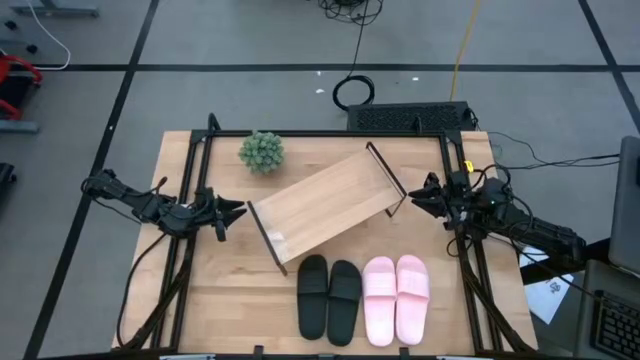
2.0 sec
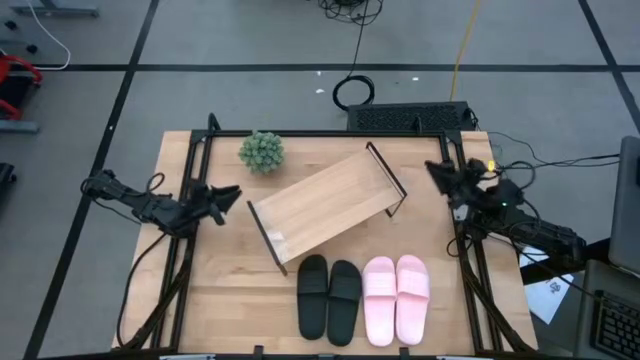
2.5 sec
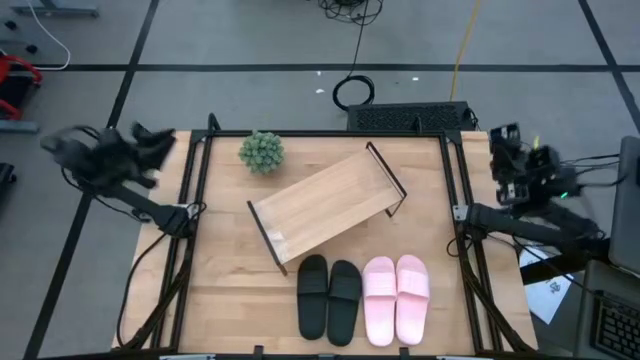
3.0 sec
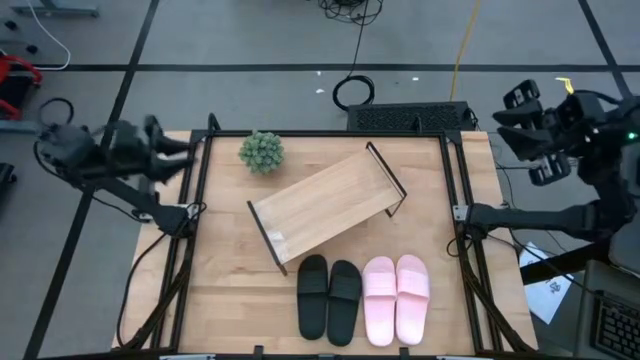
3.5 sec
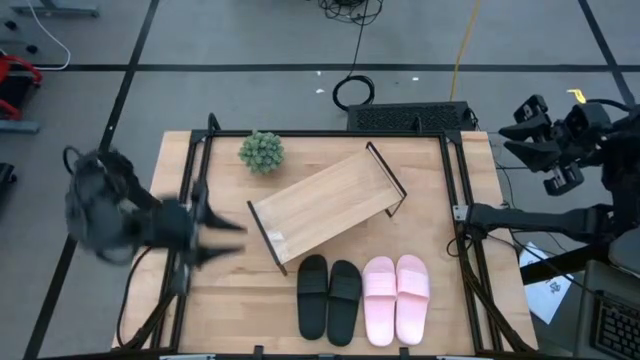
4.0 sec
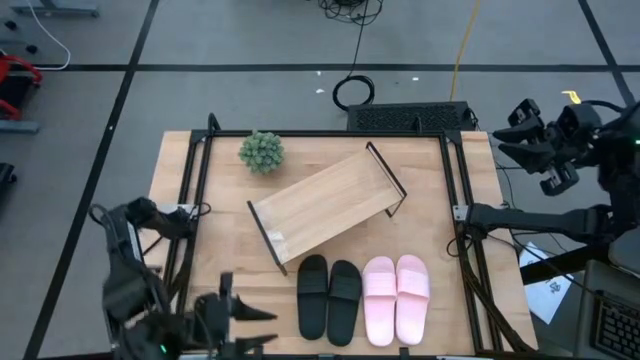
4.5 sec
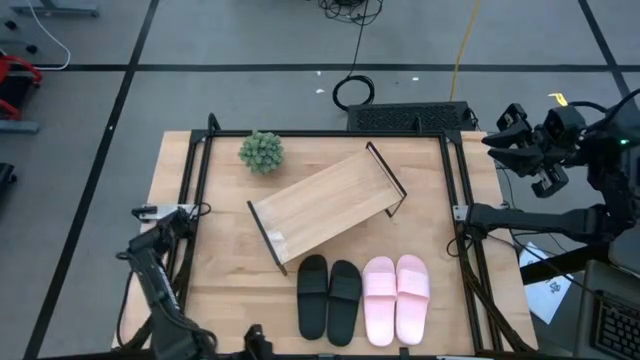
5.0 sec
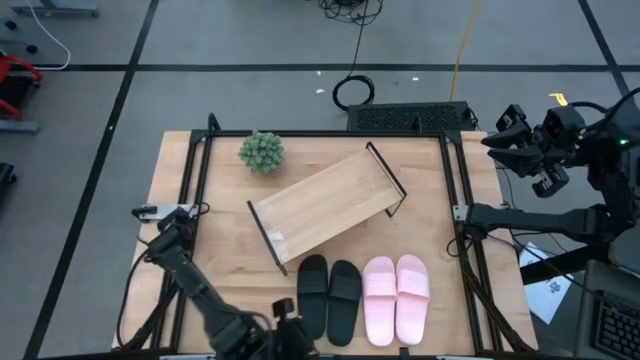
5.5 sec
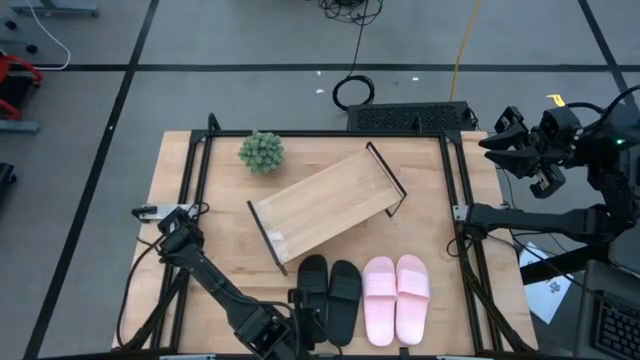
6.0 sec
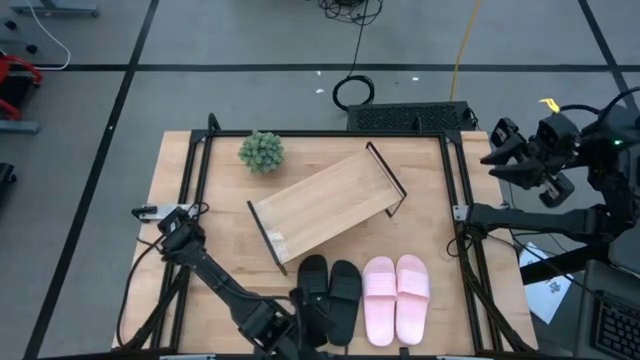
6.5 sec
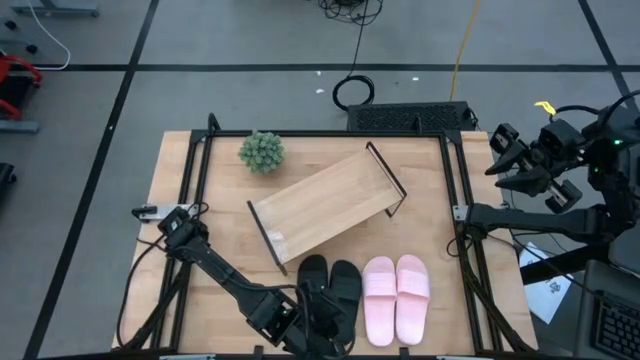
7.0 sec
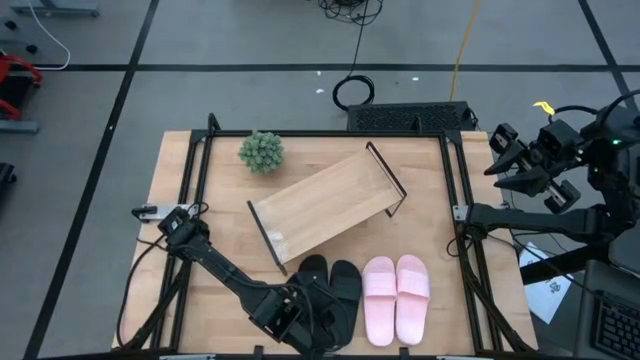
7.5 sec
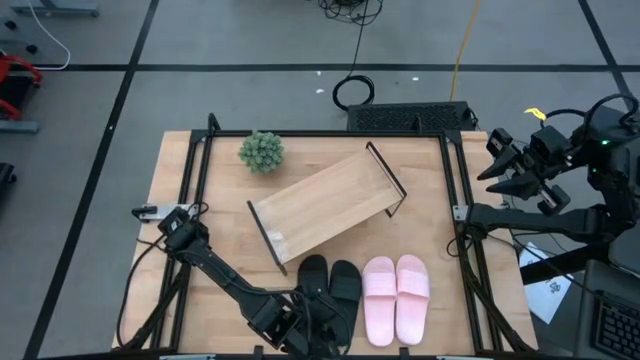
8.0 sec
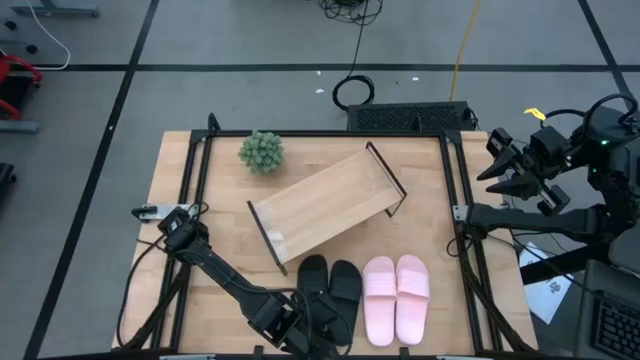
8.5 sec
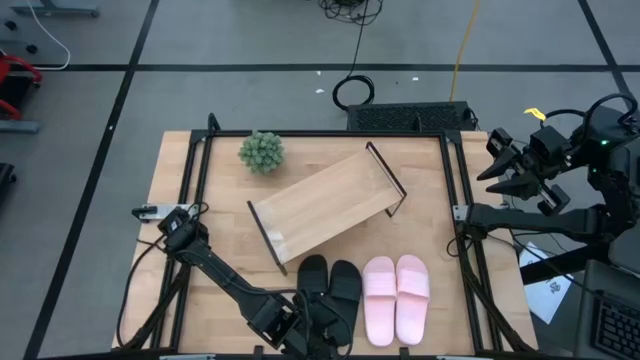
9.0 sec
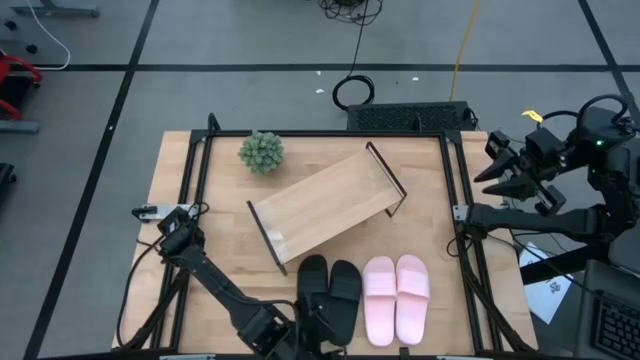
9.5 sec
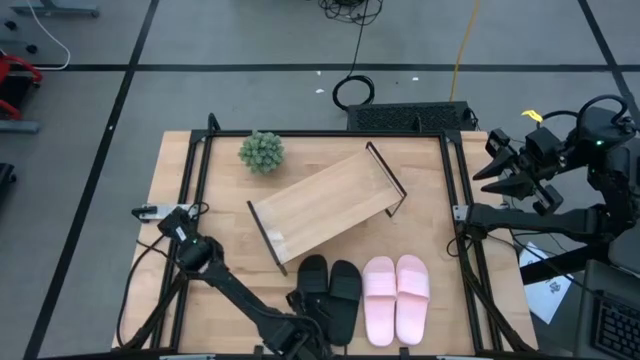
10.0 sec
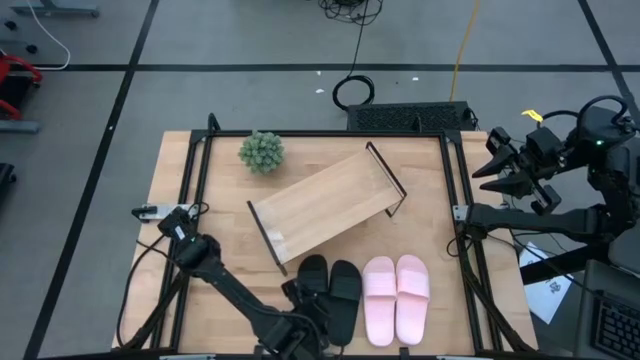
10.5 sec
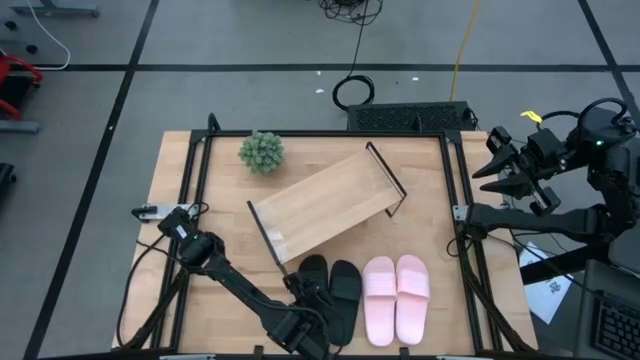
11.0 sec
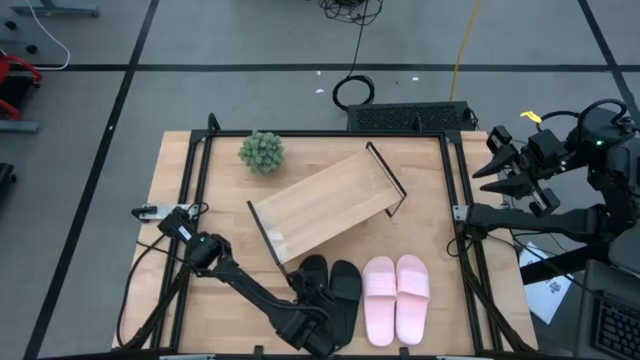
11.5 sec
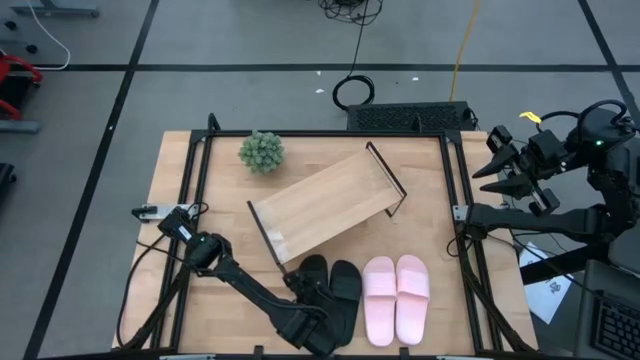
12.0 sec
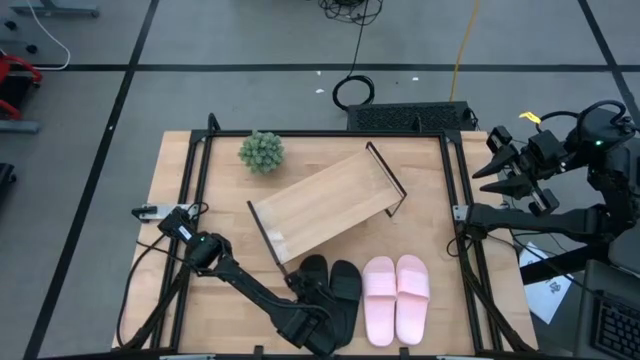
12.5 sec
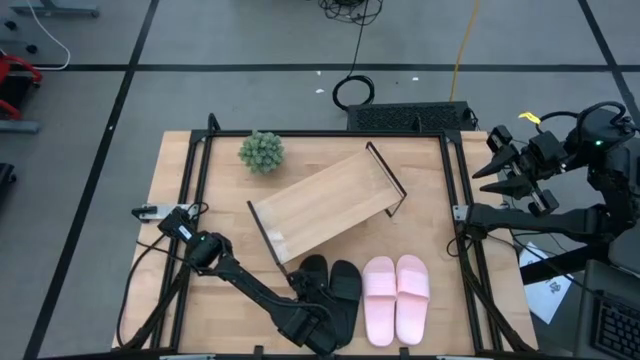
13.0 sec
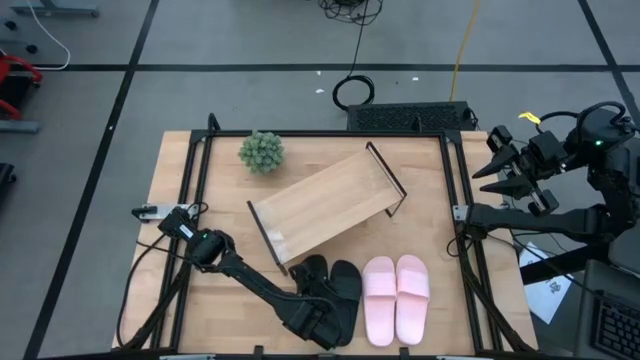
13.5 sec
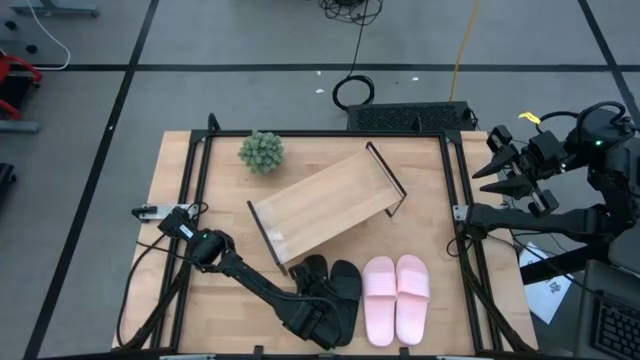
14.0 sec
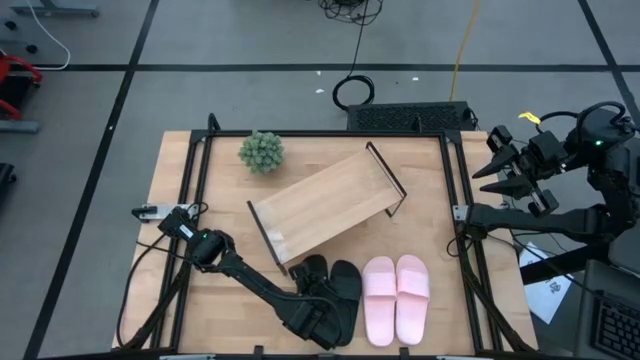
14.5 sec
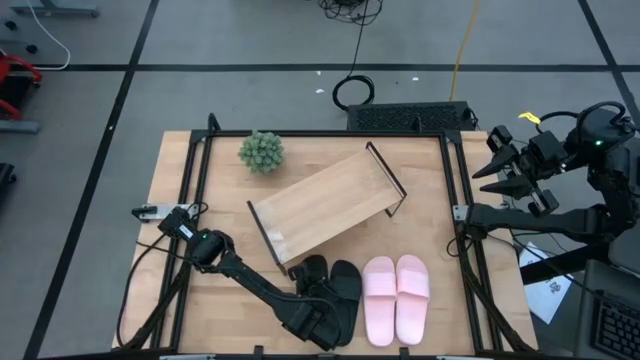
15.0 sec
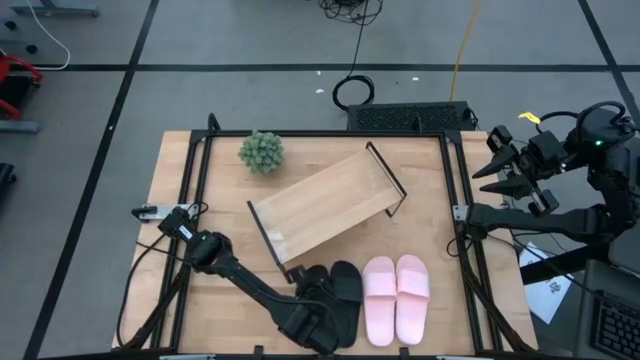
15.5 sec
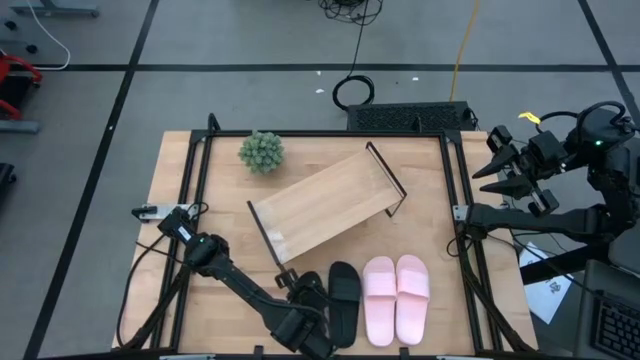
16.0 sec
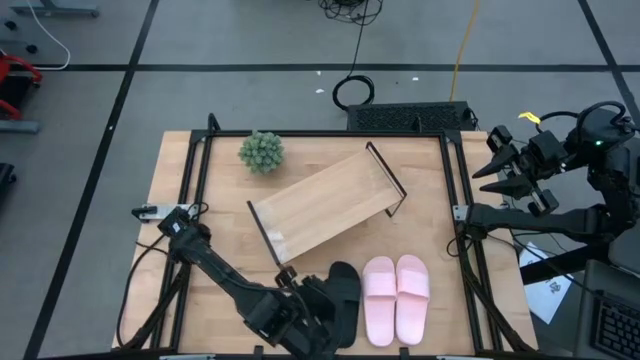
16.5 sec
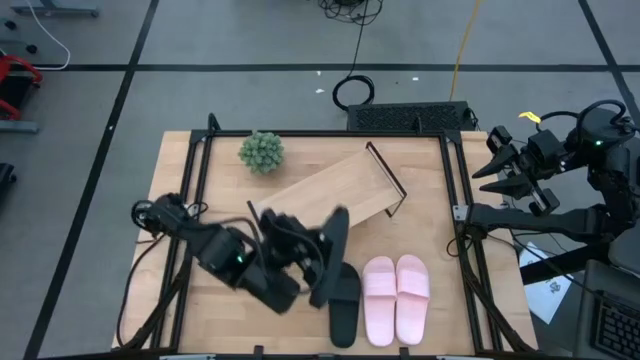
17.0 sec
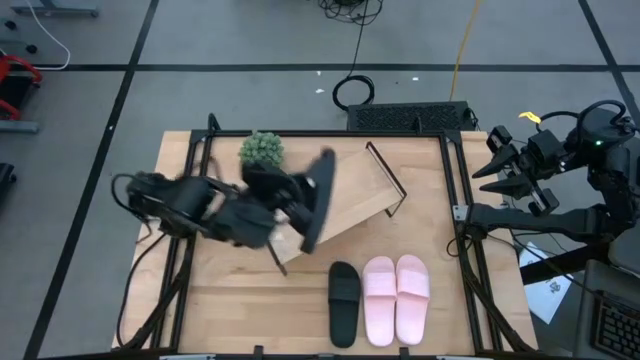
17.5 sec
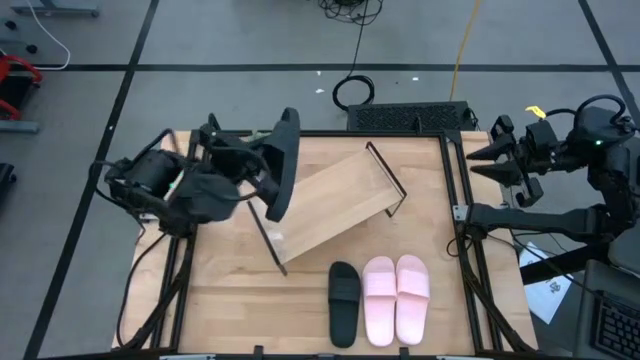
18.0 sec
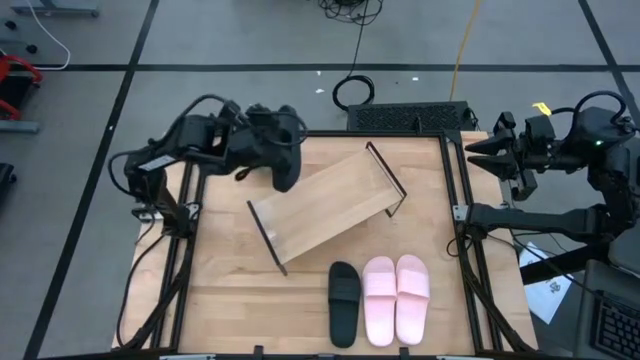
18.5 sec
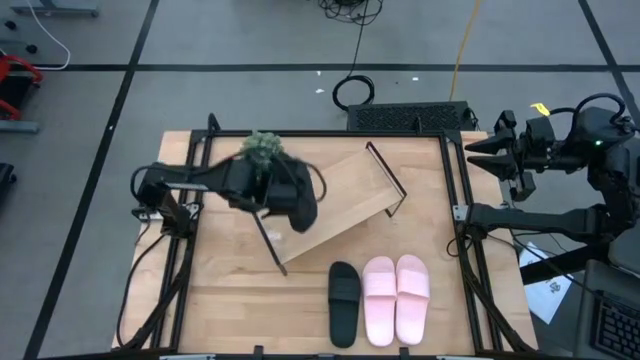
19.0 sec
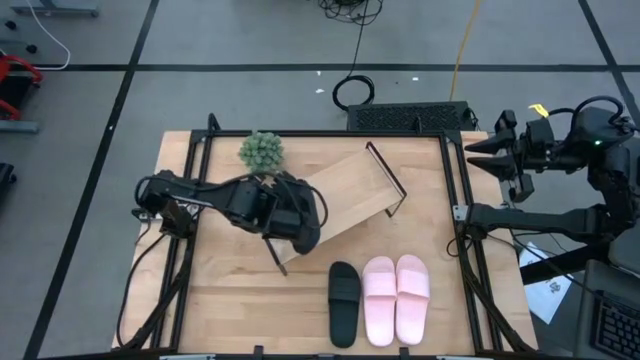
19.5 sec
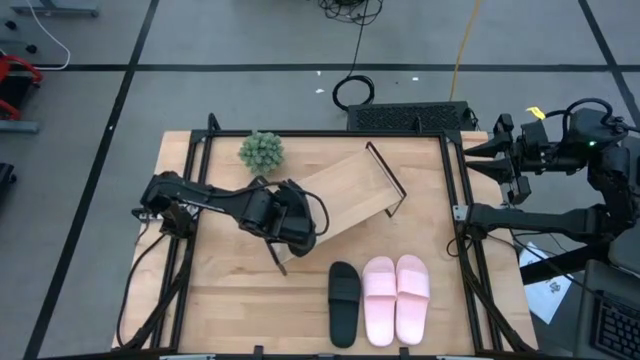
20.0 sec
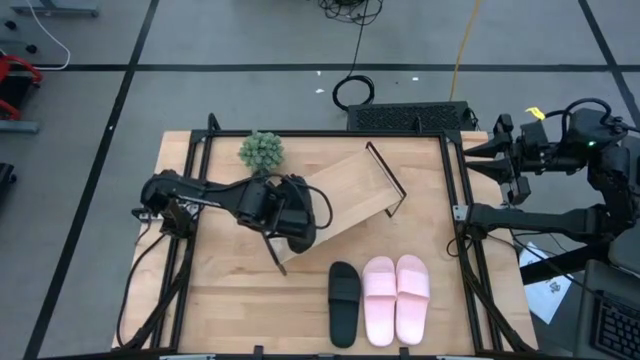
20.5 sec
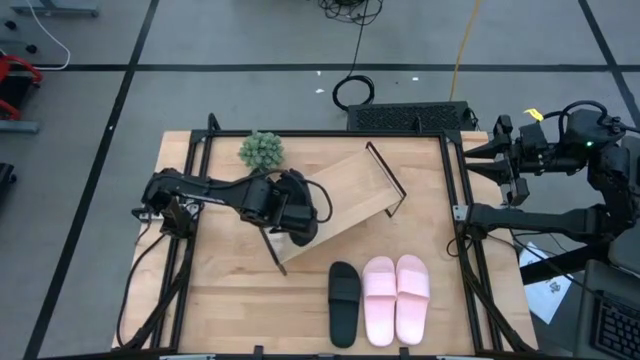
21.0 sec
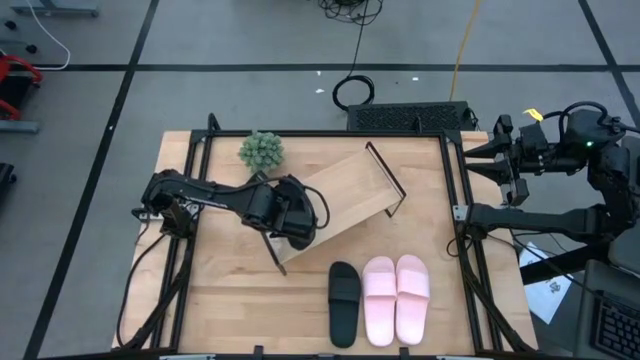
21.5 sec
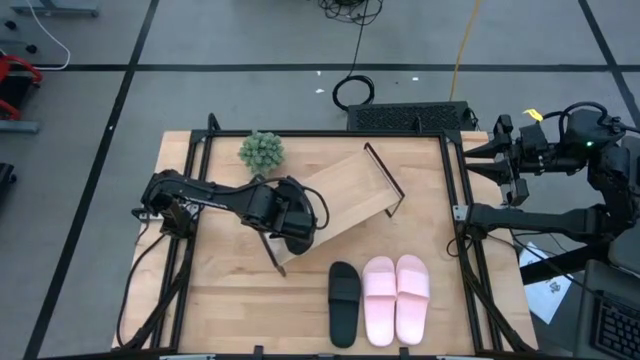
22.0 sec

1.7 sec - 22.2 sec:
Task: Pick and place slides into the shelf
Put the left black slide on the shelf
